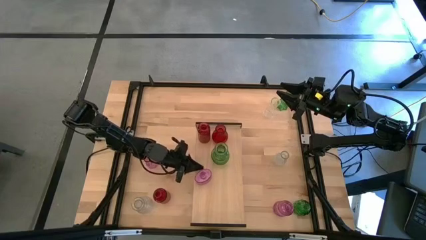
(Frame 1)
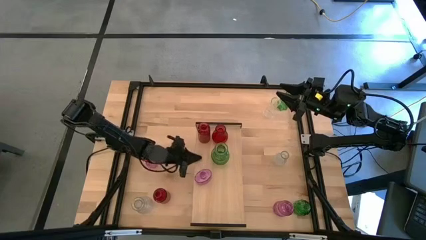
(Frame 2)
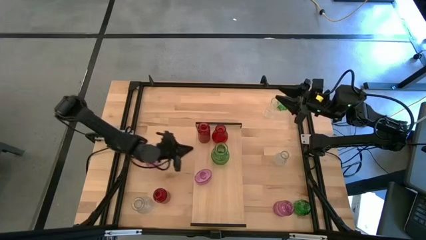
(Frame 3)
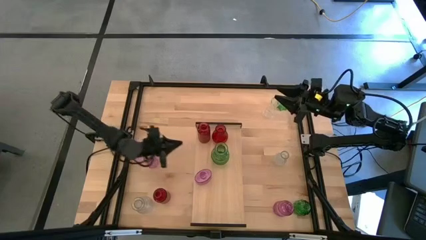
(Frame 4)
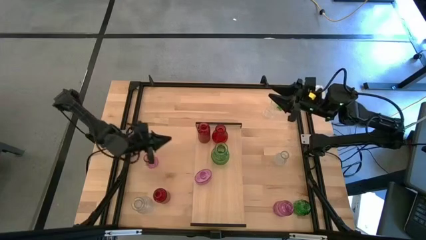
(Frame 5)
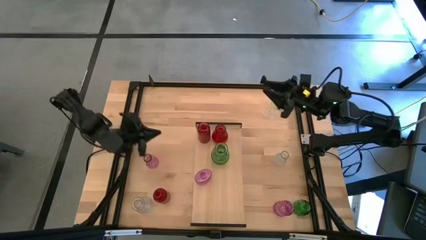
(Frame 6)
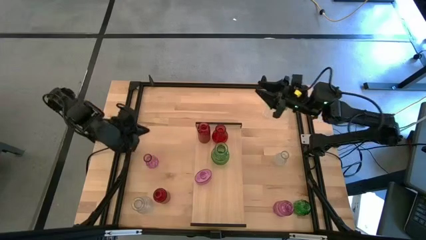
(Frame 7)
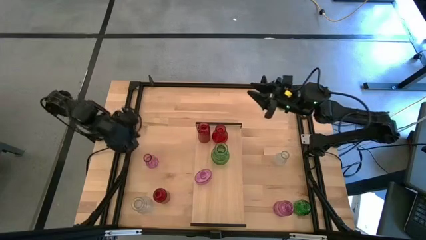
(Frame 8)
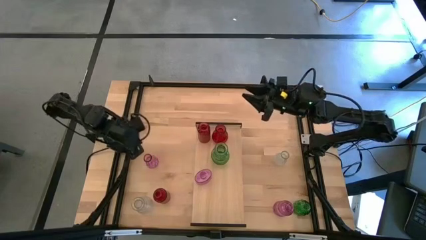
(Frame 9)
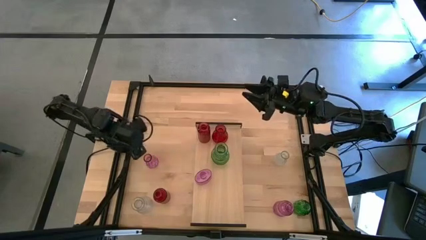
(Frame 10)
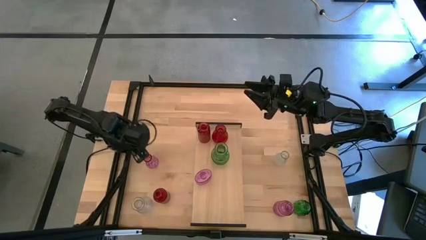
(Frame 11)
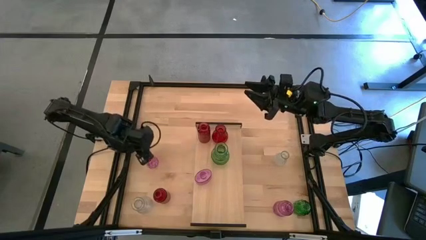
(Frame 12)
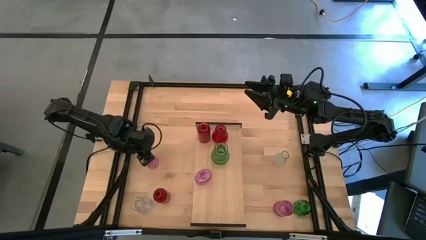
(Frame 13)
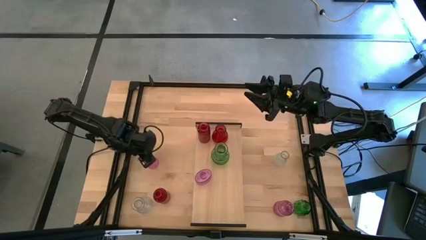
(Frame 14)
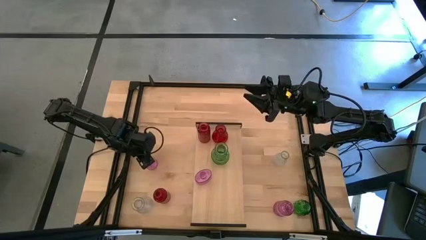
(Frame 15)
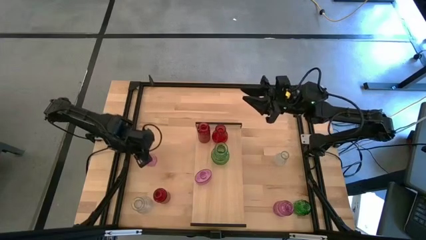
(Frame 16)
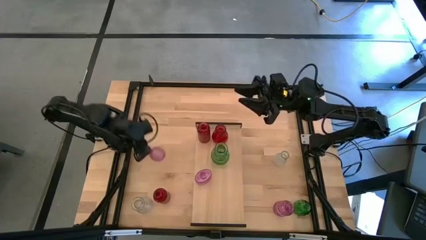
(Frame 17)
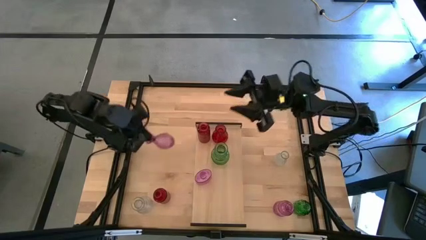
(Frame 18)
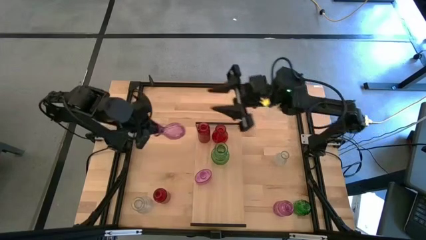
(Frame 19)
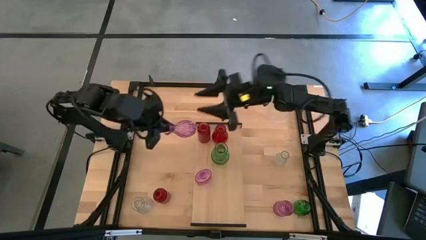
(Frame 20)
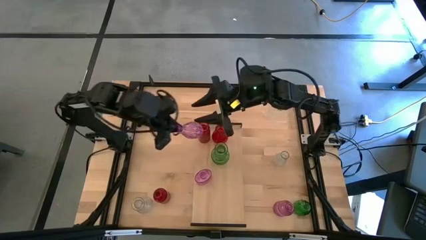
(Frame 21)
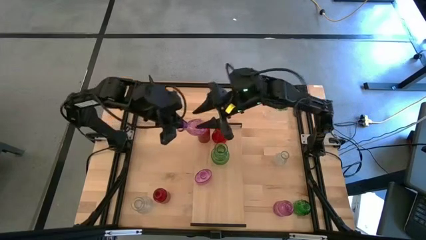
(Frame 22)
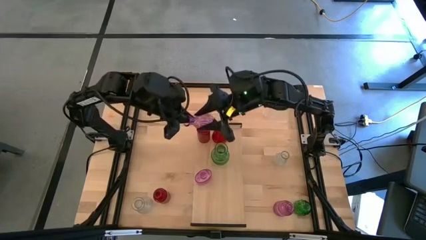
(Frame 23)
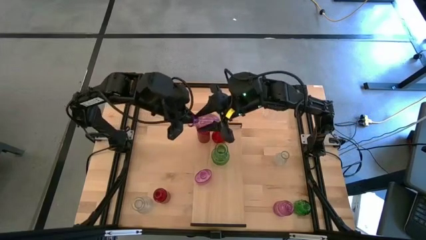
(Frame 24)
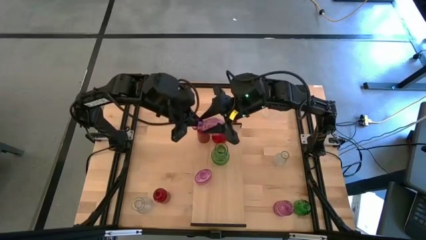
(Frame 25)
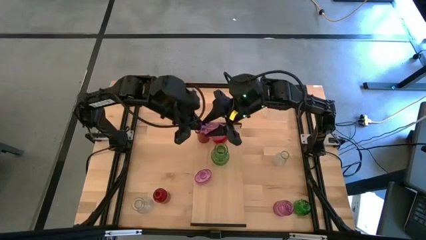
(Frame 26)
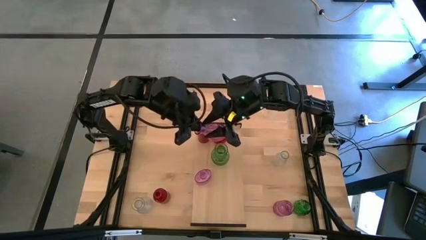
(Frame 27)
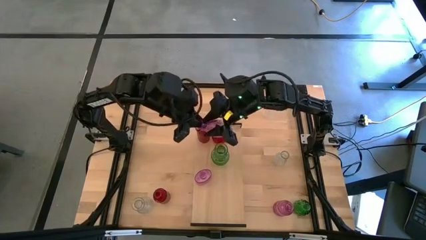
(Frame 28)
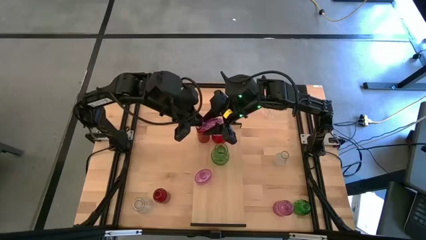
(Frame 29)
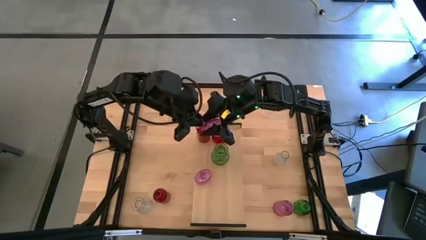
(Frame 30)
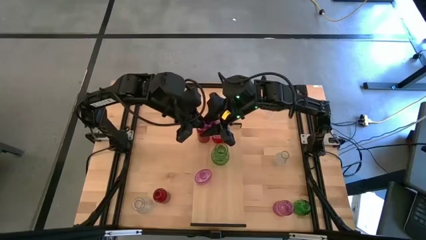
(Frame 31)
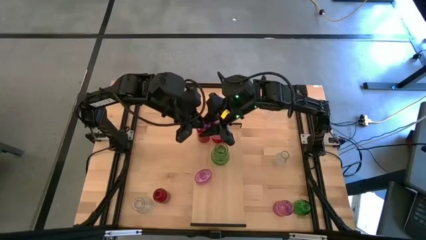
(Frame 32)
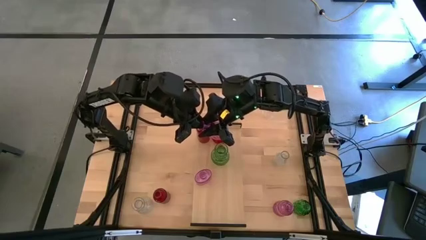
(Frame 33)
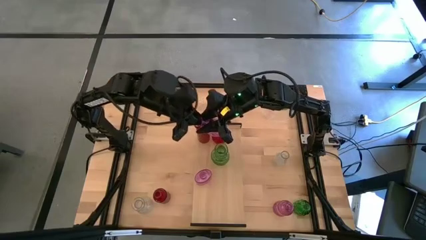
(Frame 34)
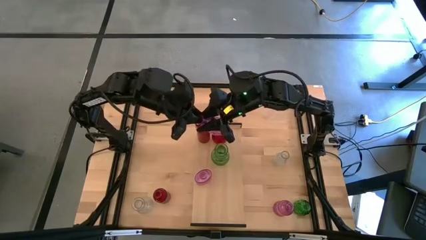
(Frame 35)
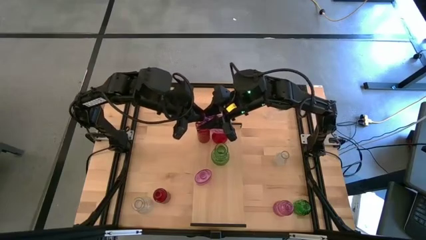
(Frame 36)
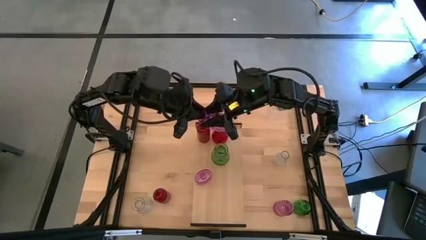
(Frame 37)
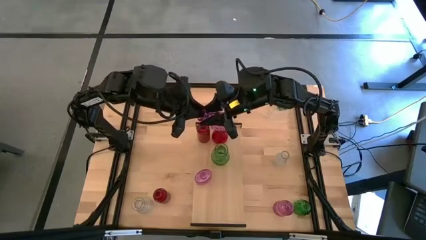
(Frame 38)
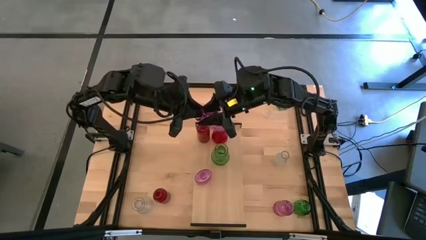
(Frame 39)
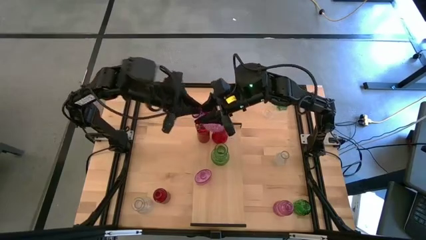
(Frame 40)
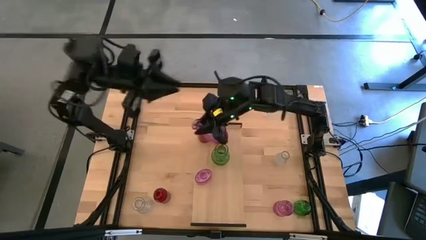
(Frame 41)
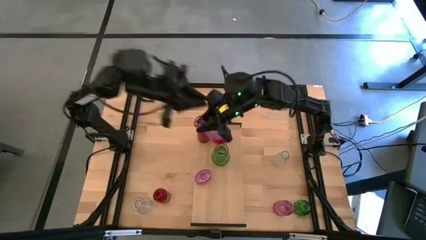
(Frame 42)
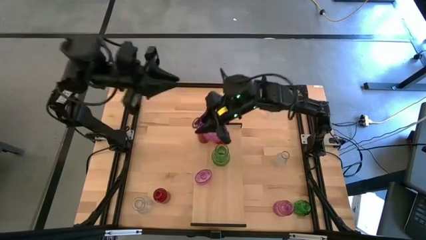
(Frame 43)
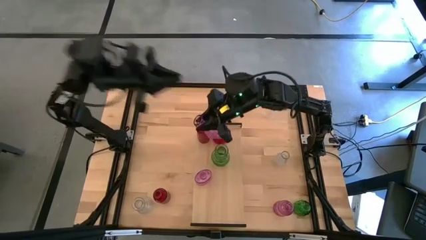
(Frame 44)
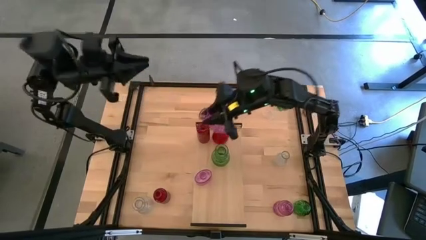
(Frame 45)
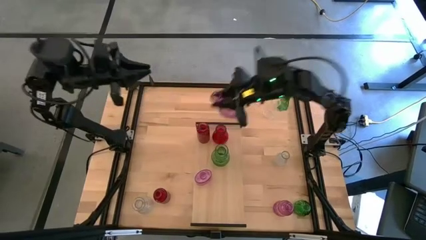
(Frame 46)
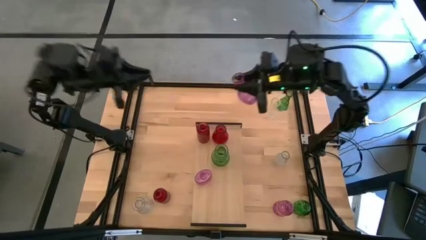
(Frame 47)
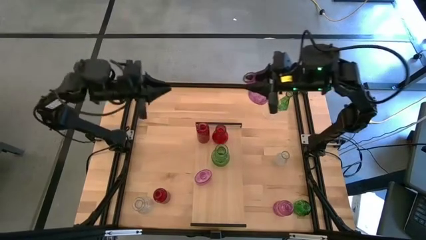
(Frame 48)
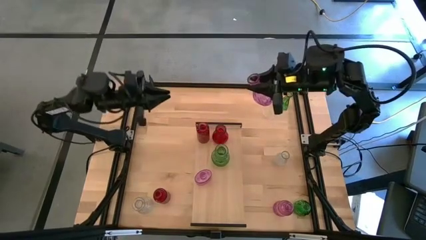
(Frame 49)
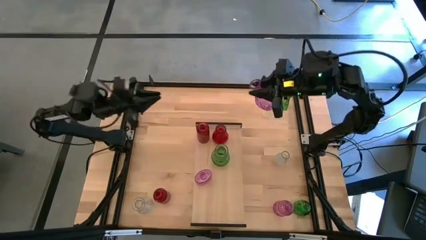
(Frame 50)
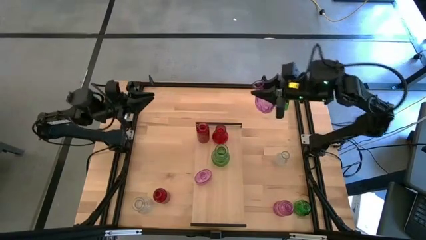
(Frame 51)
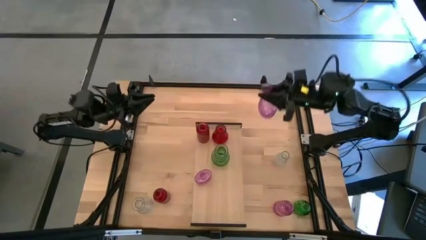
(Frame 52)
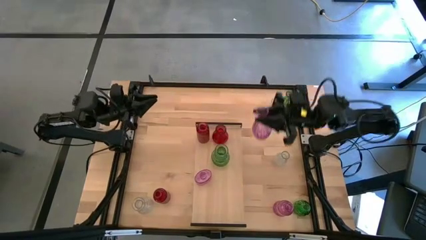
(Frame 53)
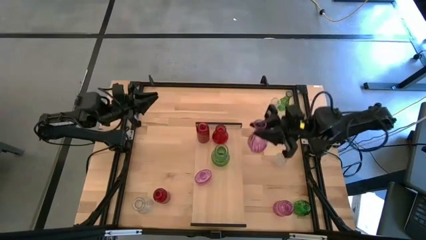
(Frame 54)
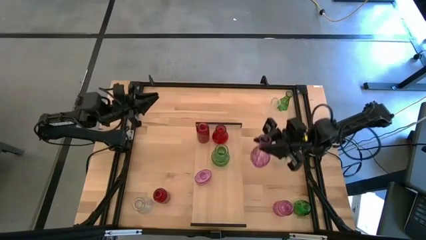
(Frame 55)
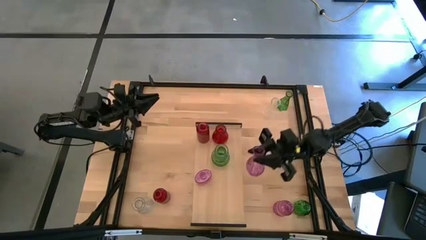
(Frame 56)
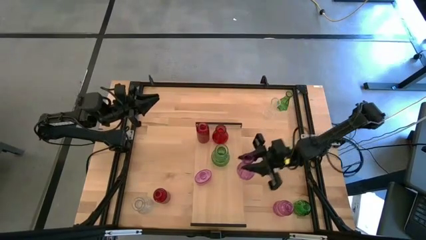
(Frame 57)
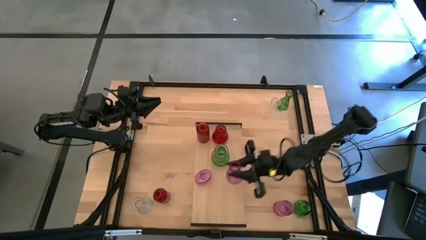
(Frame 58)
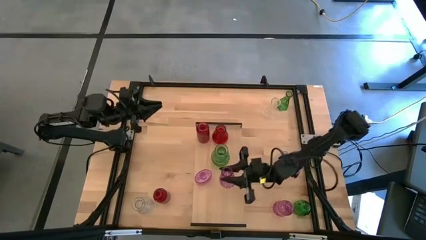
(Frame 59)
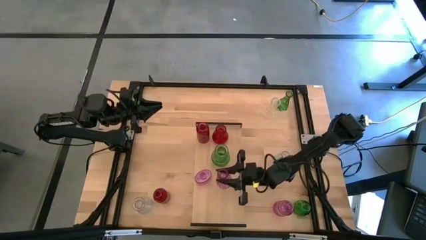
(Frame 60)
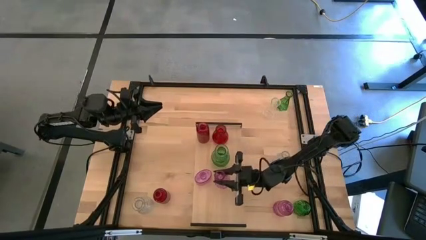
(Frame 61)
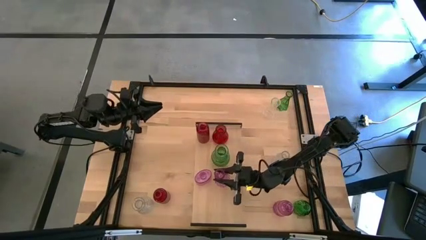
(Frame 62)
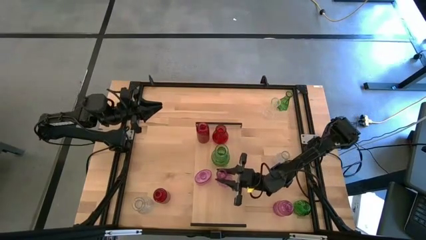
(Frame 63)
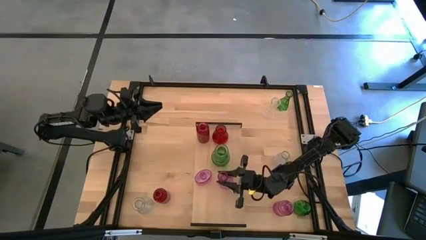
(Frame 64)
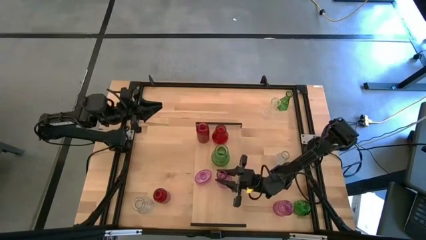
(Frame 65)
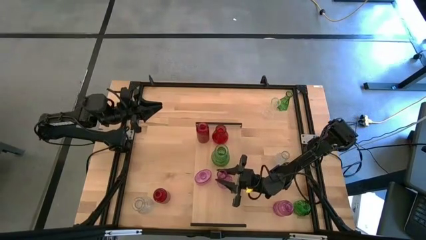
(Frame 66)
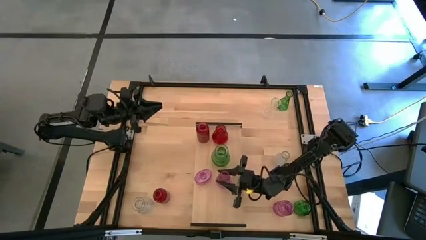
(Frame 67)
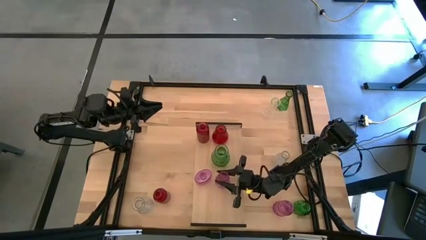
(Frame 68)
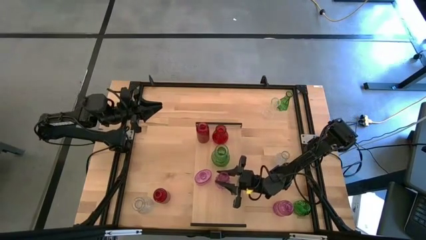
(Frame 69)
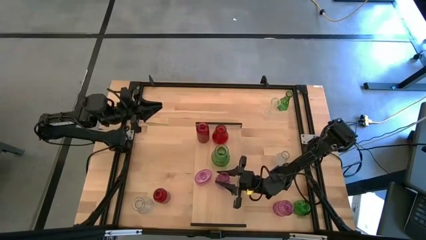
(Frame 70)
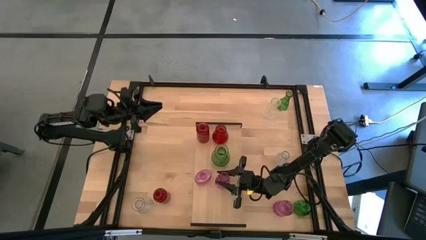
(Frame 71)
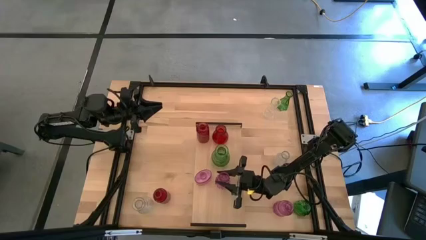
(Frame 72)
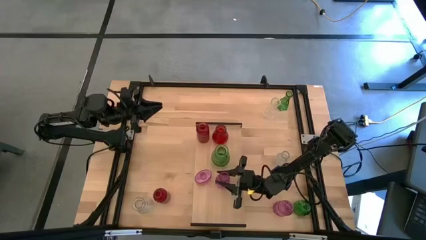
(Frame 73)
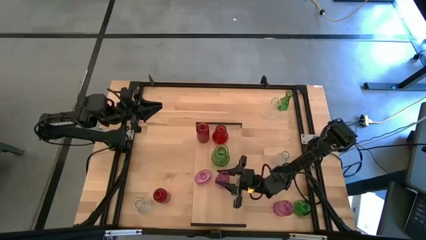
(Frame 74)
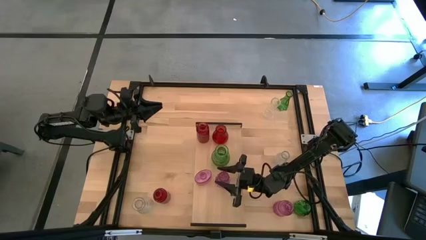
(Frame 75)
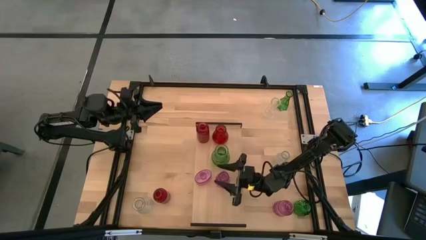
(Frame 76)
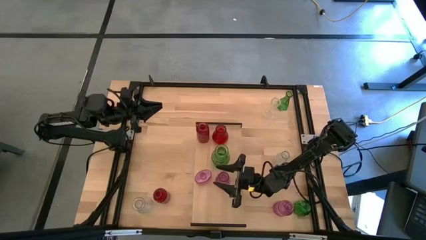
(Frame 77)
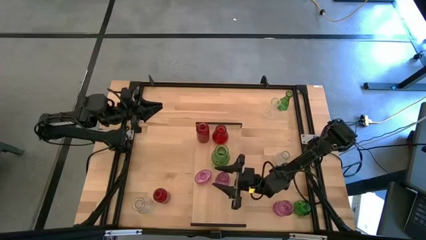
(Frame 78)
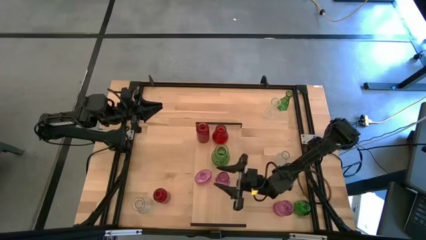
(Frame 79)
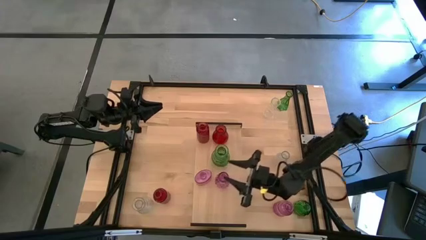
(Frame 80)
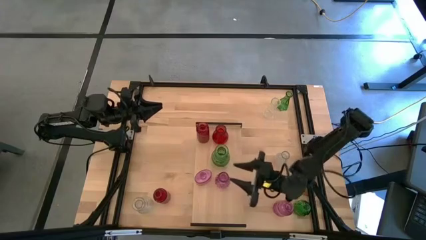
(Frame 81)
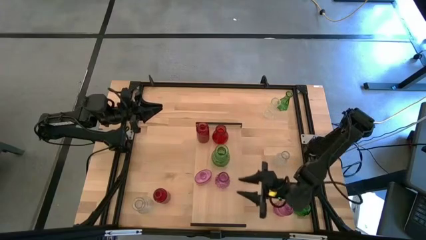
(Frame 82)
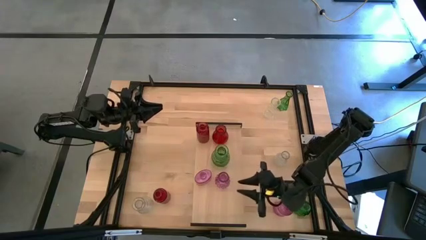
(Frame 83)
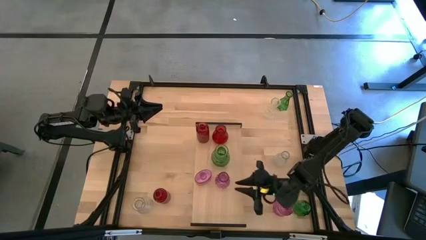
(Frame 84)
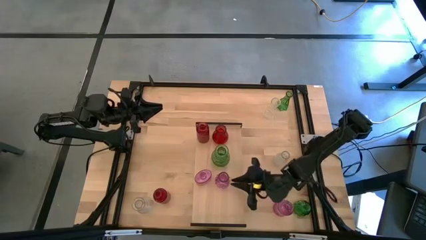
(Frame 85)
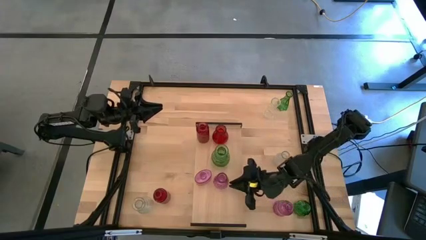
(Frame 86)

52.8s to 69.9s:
Task: sort vases onto shelf
Put the top pink vase on the shelf aligned with the other pink vase
